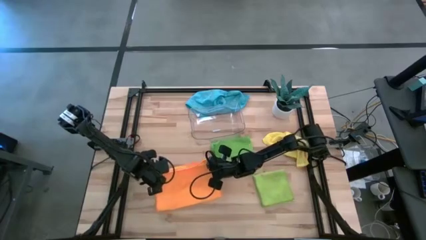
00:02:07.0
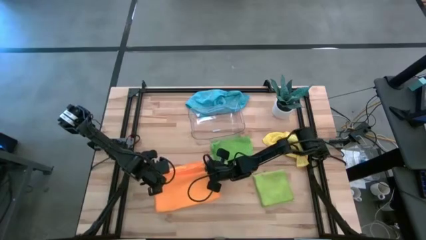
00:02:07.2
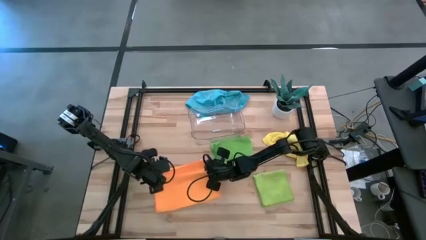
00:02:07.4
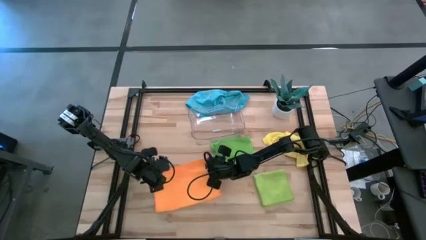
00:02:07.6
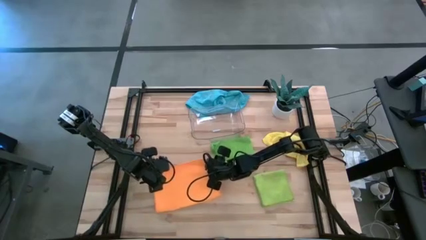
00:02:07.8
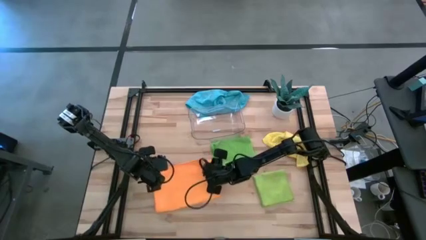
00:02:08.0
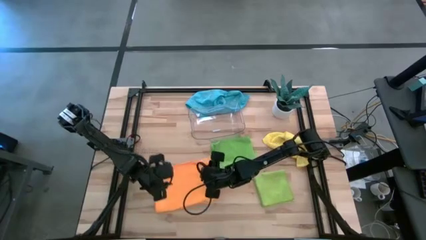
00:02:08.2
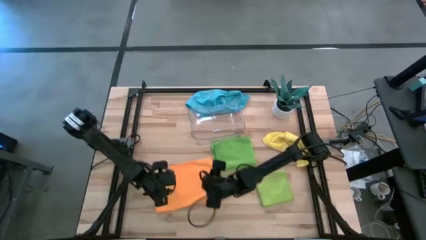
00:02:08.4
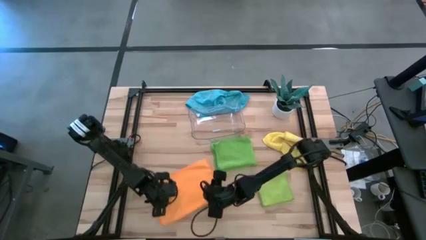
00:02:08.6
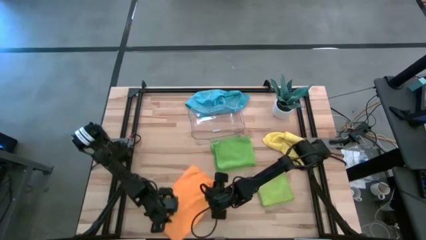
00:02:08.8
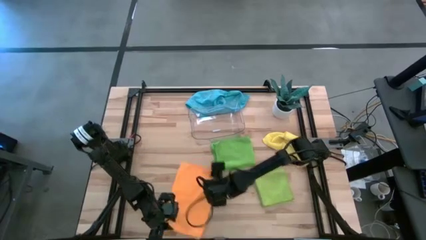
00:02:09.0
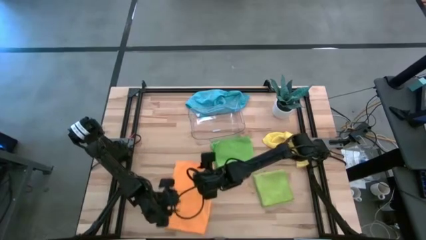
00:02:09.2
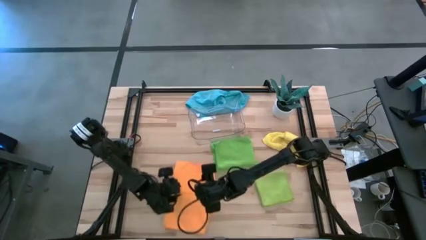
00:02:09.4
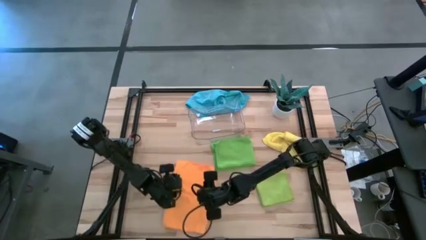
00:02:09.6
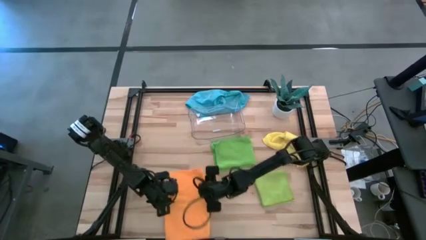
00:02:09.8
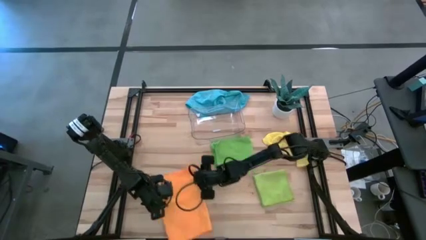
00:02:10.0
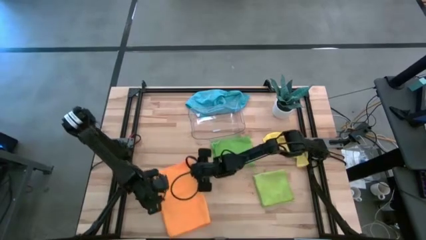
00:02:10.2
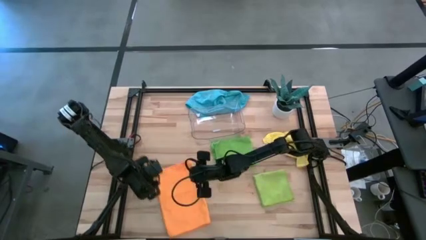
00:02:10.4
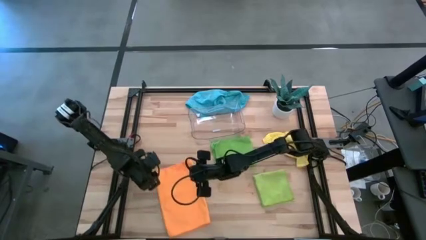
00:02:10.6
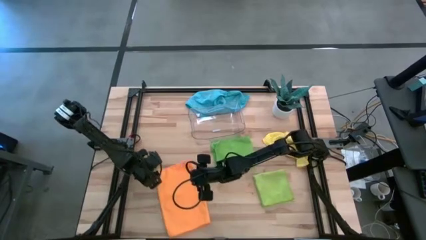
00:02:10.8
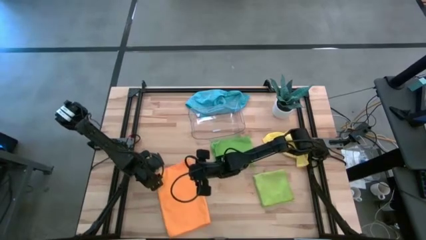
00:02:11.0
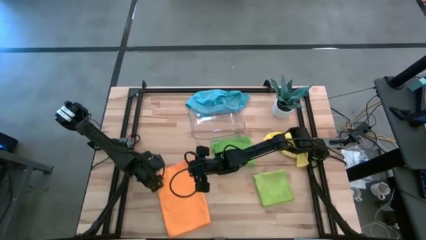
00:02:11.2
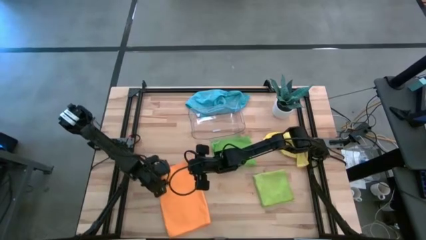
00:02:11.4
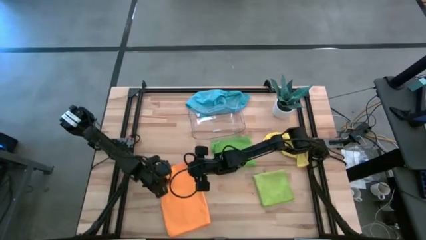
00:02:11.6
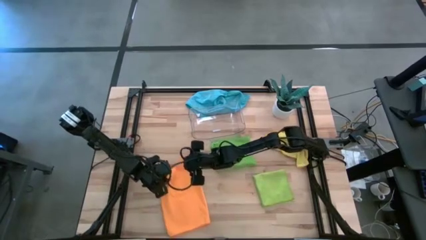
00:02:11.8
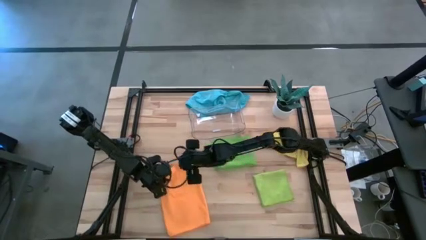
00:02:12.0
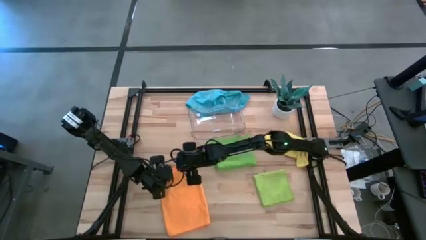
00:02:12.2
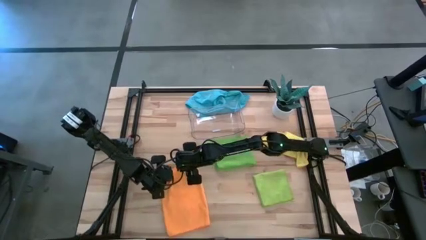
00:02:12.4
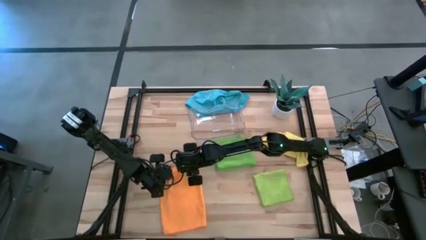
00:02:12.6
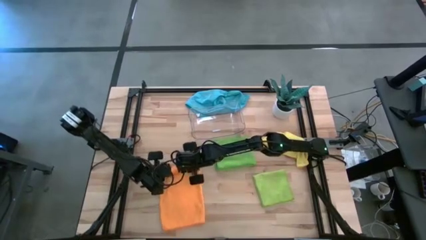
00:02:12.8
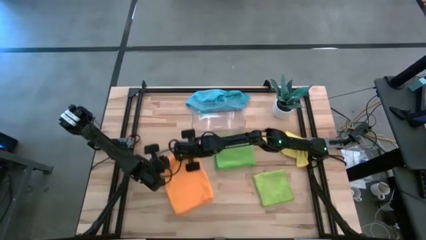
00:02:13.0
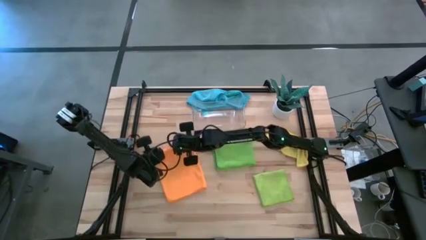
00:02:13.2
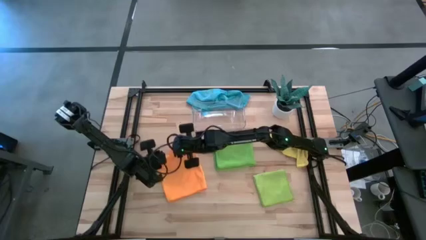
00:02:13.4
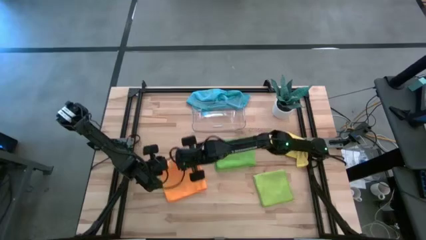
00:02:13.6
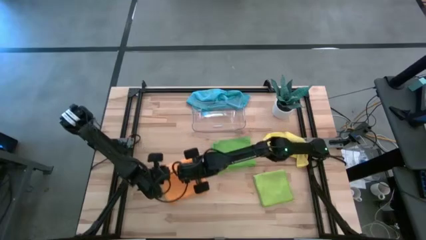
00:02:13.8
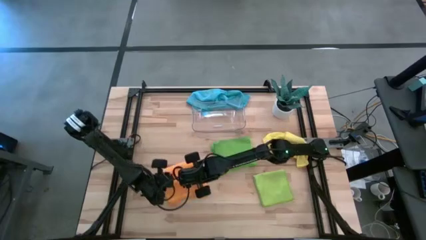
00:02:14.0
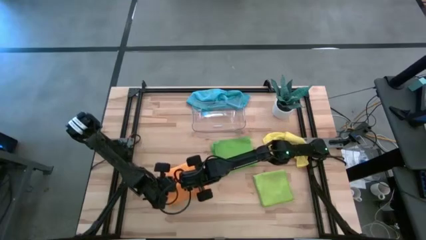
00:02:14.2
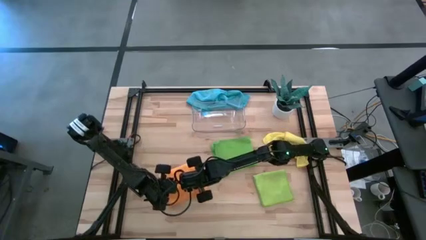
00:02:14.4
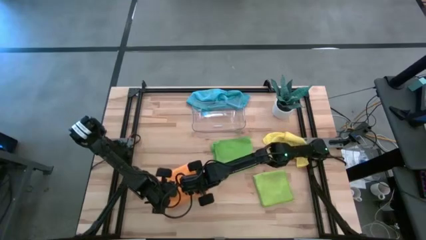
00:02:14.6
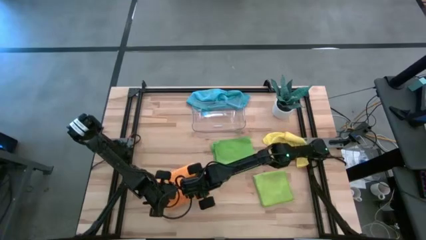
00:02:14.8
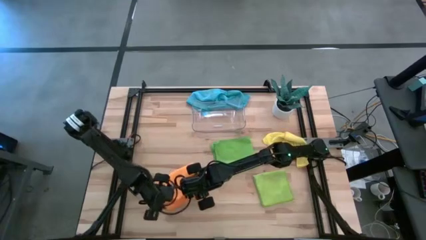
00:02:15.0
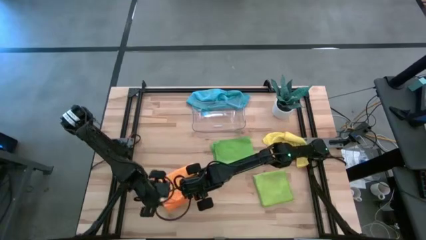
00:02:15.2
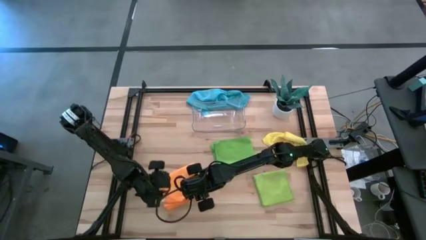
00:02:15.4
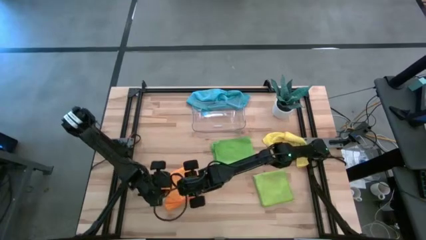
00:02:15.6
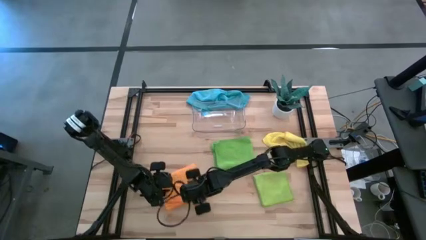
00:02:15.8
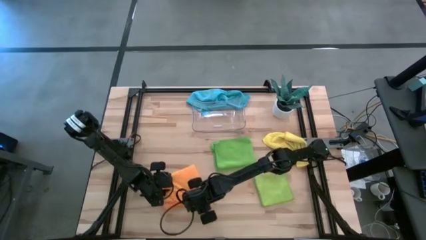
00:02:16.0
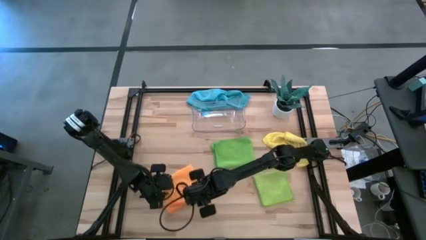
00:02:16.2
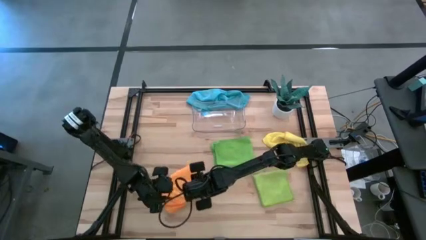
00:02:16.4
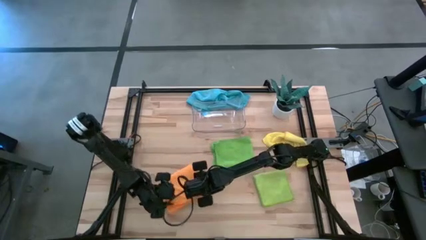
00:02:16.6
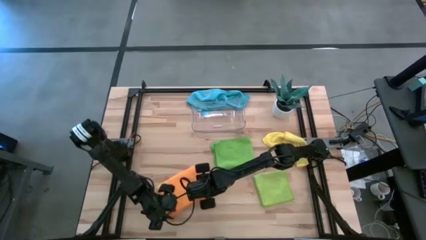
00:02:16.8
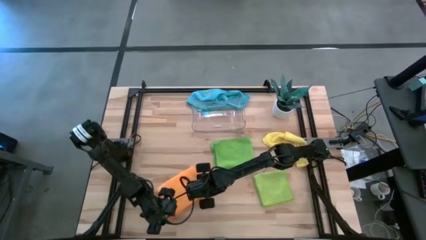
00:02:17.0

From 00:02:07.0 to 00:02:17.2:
Task: Fold microfiber towels
Fold the orange microfiber cloth

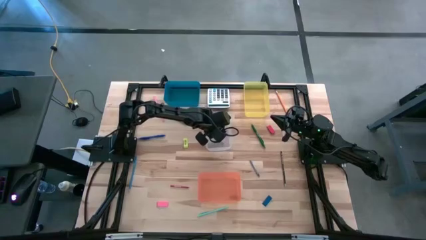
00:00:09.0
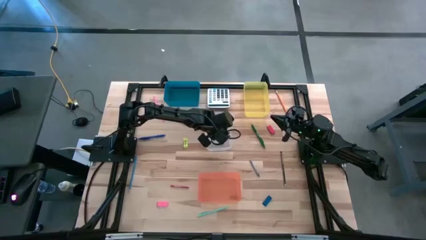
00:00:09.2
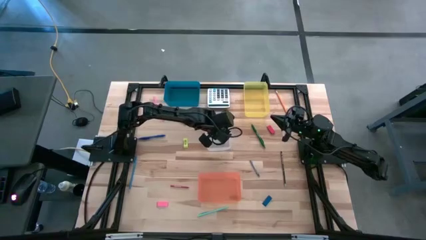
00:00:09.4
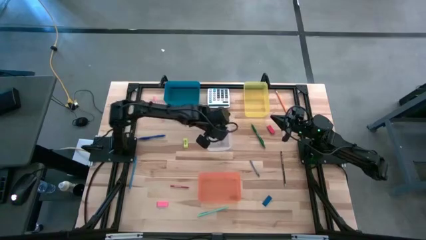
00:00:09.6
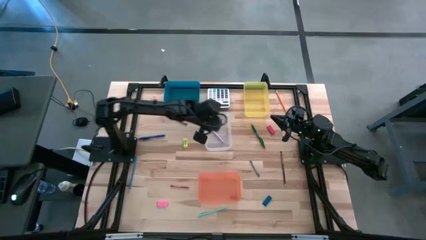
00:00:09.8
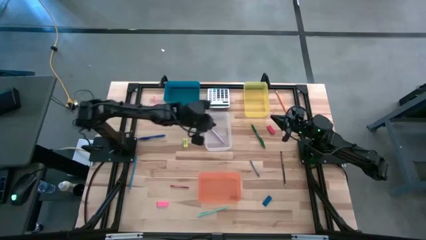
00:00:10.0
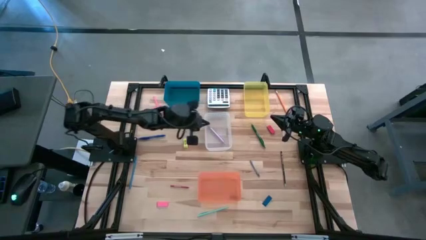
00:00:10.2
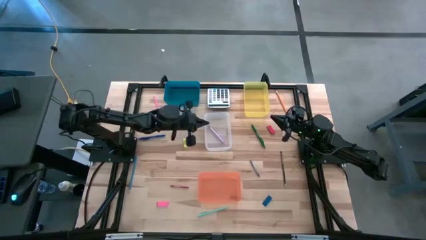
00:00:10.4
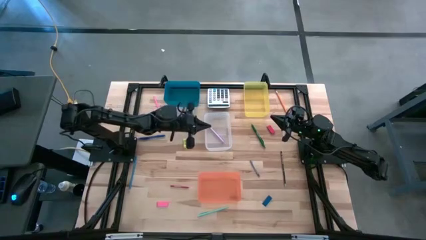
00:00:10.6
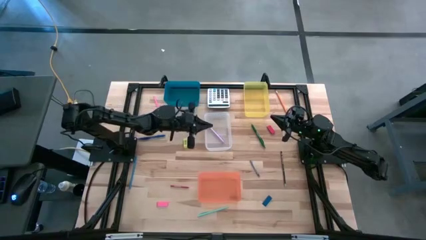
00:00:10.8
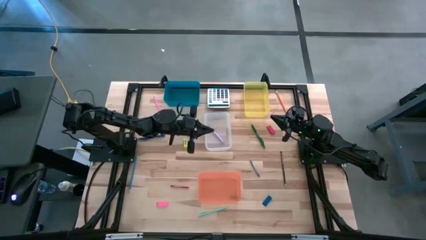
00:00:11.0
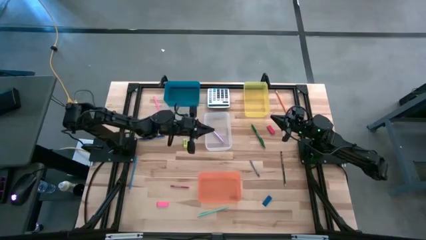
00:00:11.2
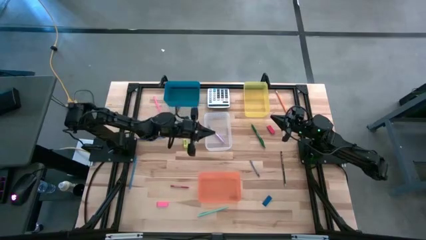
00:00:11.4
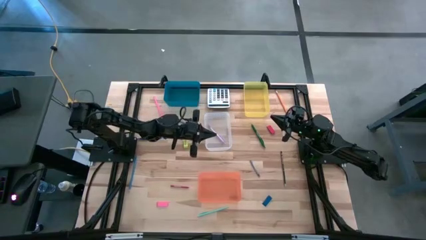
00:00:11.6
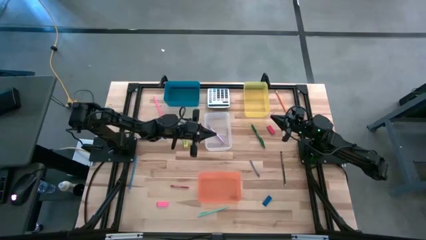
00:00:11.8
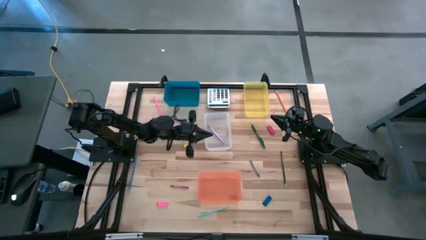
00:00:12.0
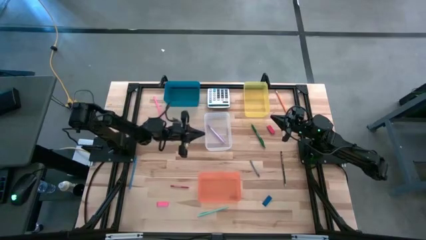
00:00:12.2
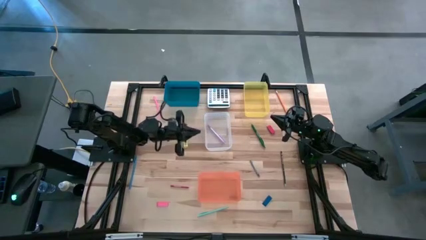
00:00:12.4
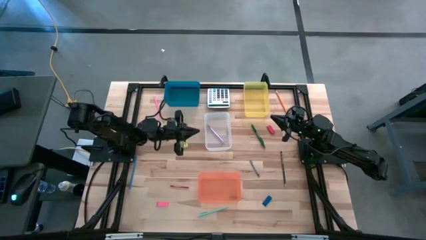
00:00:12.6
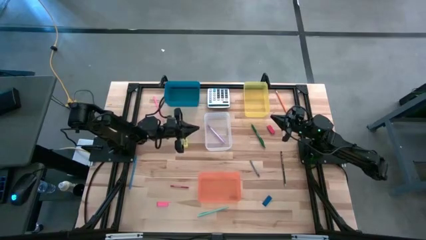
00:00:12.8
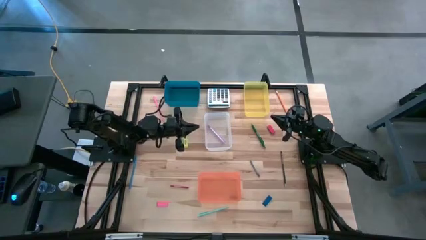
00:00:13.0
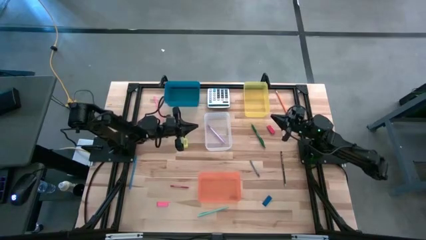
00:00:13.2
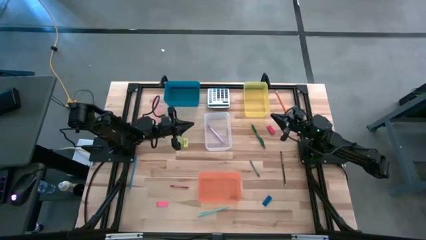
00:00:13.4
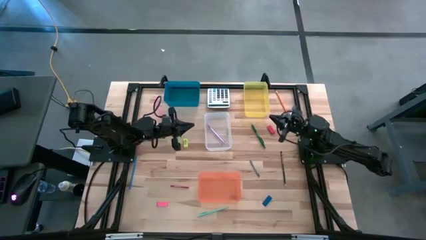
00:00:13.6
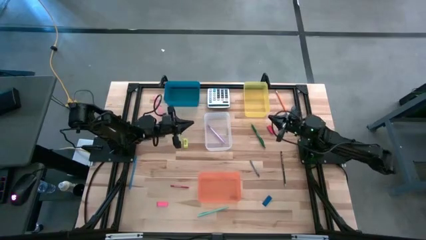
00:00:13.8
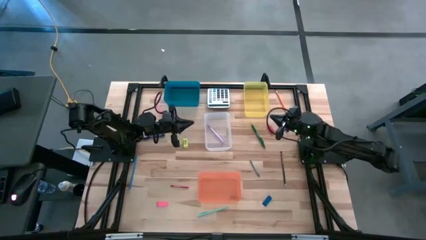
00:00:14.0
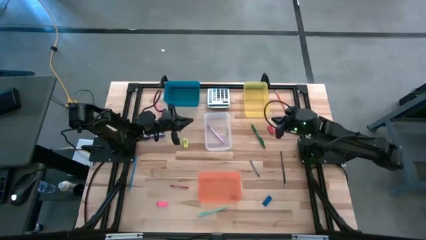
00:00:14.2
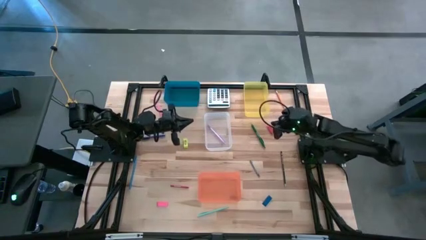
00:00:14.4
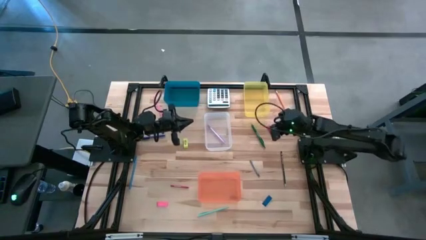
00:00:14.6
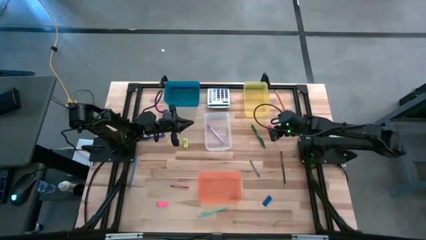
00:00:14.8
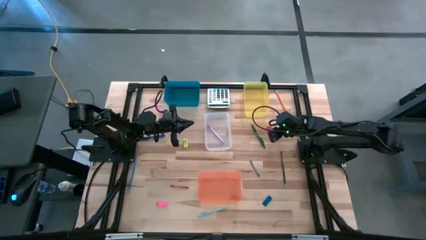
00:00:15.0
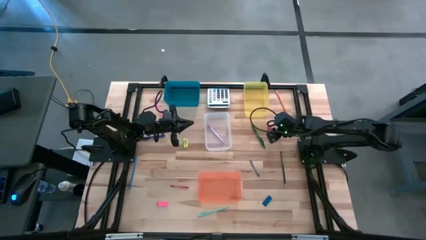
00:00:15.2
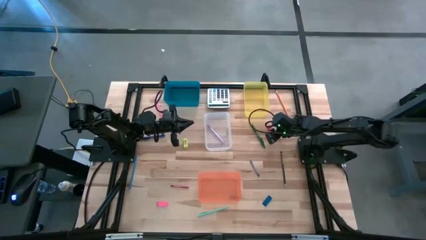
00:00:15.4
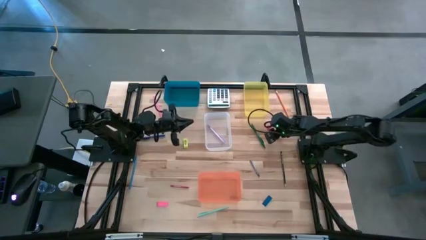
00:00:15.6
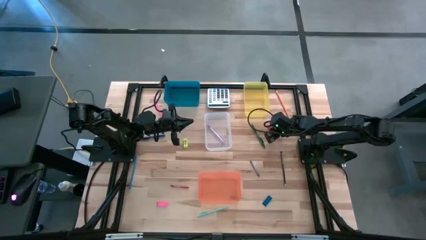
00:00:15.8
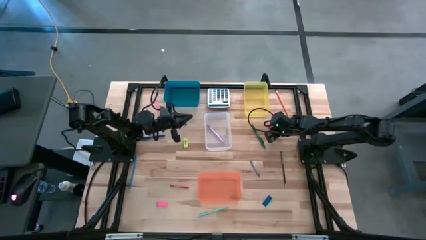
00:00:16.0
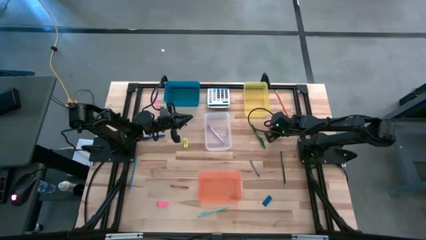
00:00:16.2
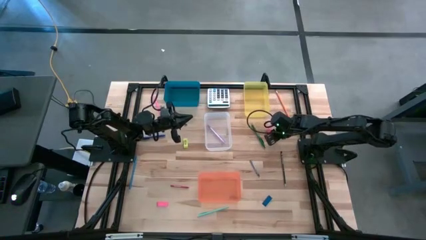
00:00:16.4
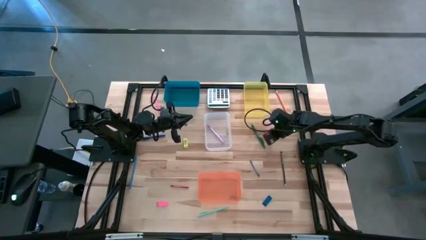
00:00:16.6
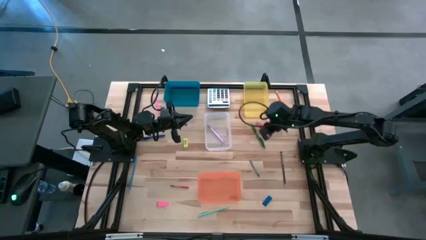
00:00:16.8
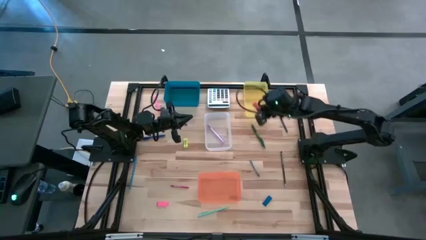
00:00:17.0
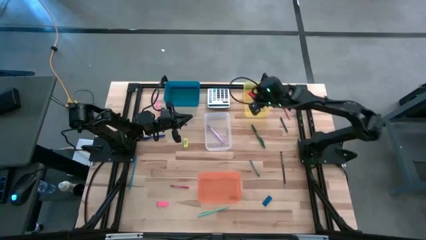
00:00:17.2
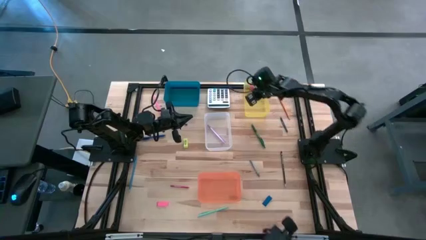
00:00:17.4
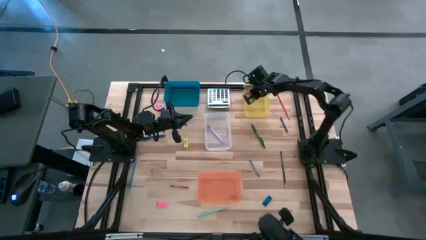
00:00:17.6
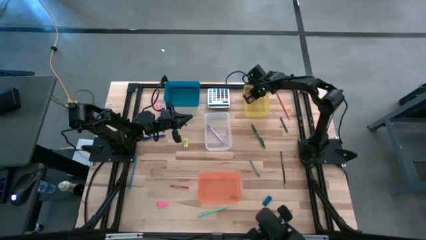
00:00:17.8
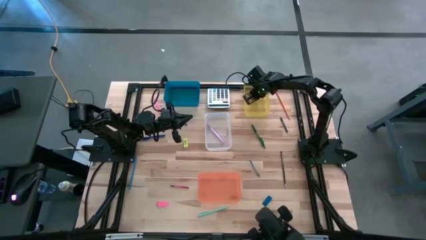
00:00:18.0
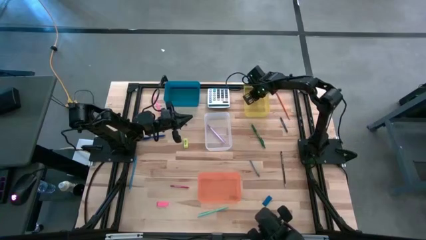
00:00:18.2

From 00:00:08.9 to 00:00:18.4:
Task: Sort crayons/erasers/pens/pencils in bins
Put the red eraser into the yellow bin
